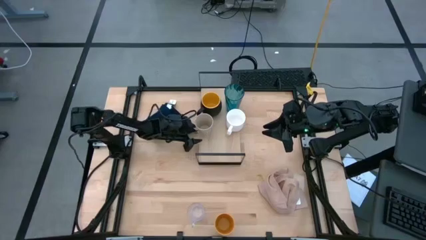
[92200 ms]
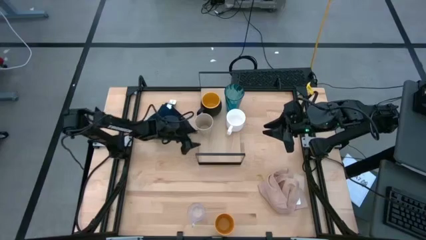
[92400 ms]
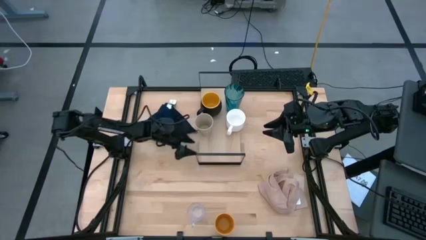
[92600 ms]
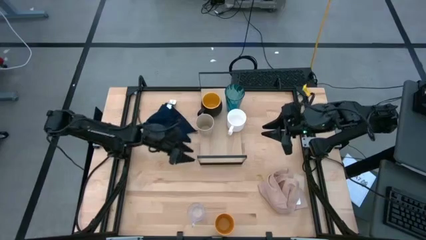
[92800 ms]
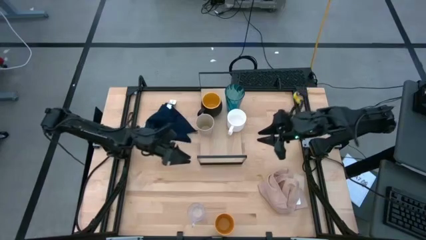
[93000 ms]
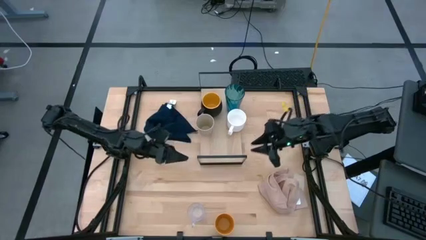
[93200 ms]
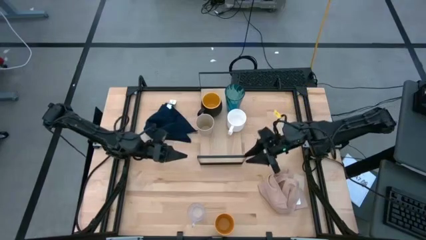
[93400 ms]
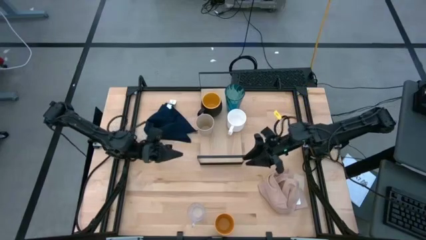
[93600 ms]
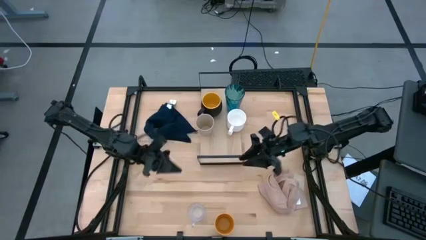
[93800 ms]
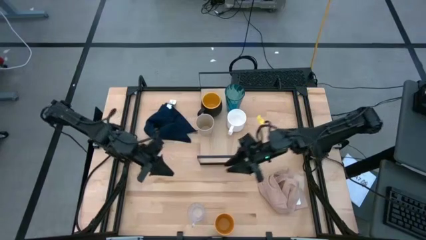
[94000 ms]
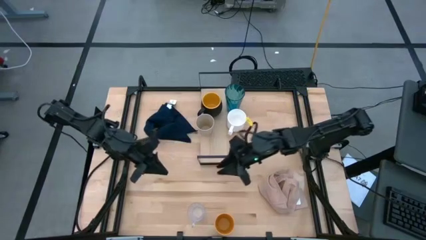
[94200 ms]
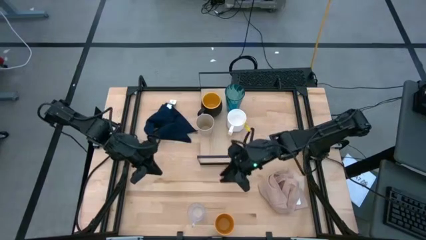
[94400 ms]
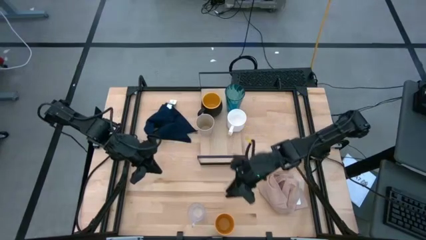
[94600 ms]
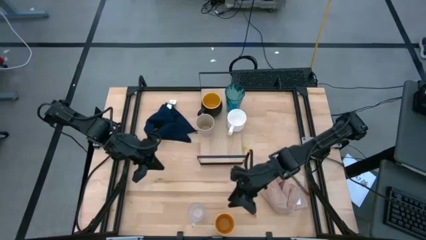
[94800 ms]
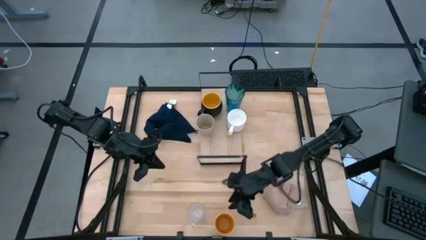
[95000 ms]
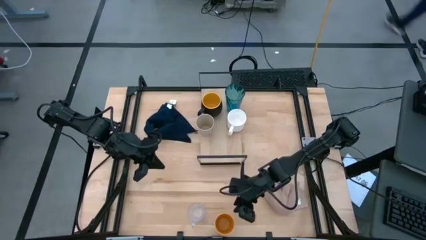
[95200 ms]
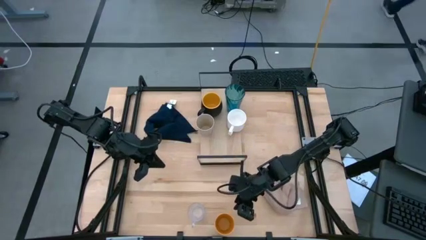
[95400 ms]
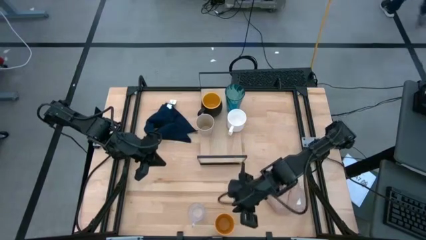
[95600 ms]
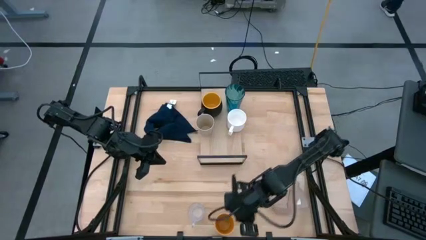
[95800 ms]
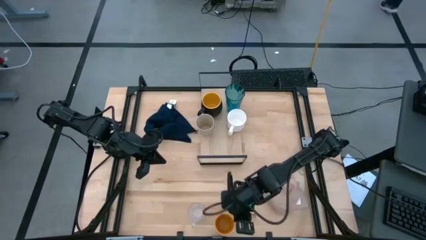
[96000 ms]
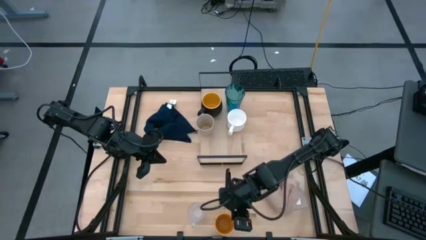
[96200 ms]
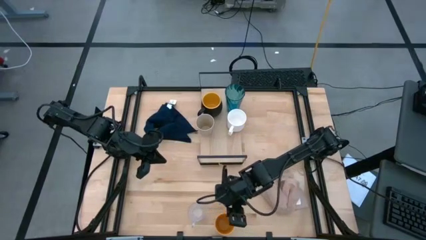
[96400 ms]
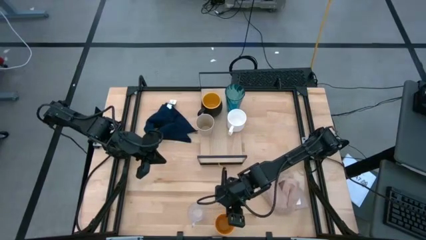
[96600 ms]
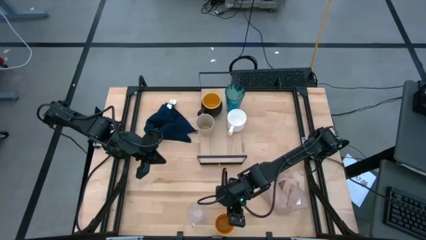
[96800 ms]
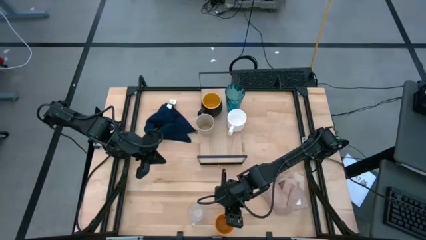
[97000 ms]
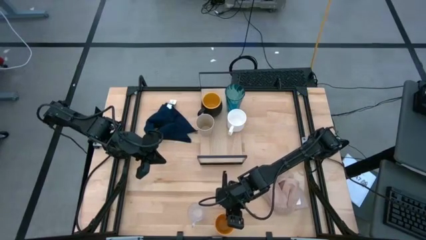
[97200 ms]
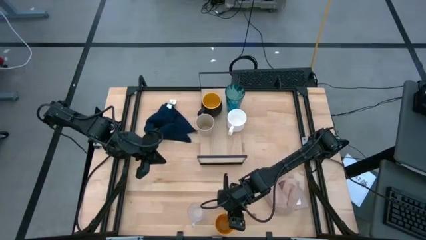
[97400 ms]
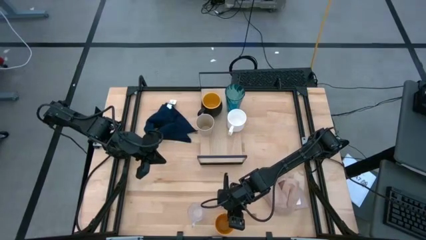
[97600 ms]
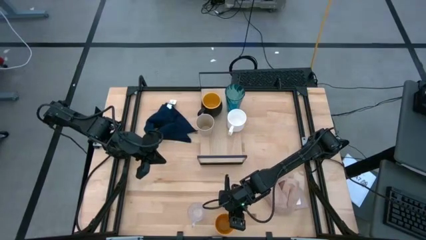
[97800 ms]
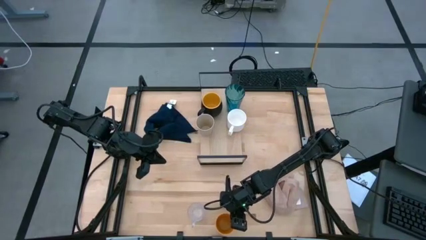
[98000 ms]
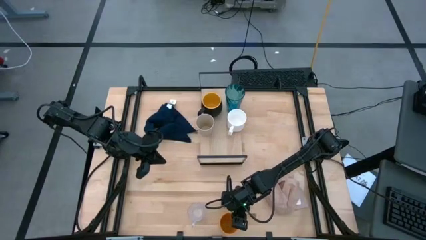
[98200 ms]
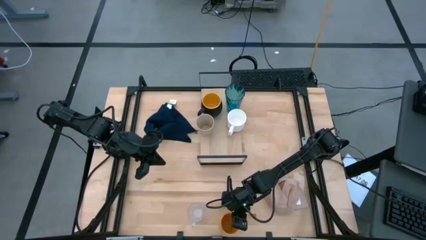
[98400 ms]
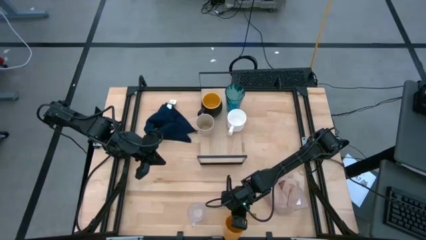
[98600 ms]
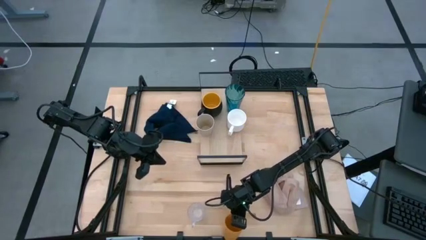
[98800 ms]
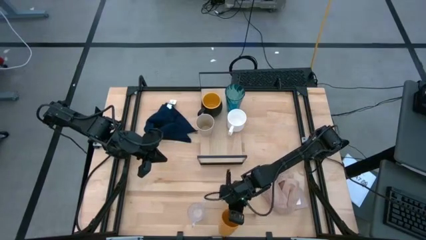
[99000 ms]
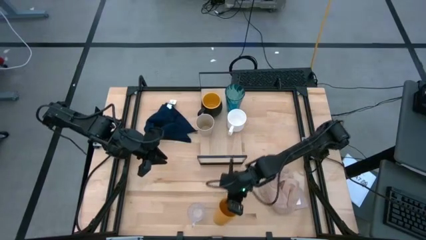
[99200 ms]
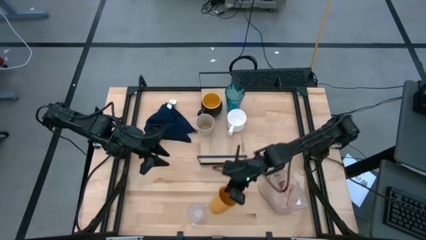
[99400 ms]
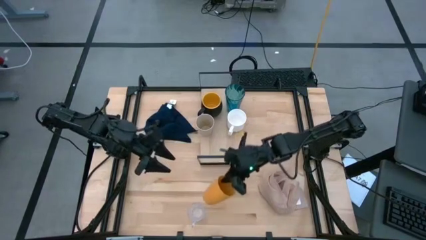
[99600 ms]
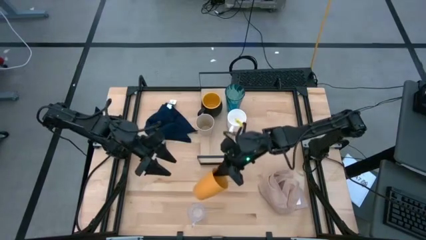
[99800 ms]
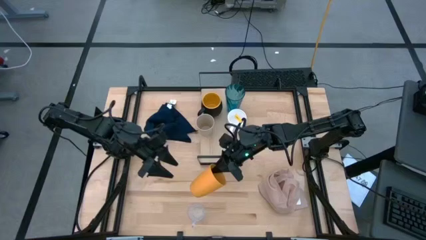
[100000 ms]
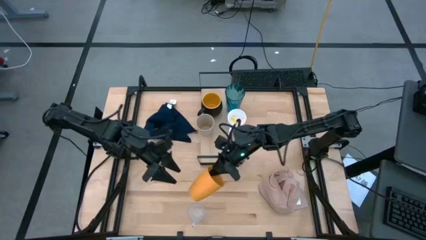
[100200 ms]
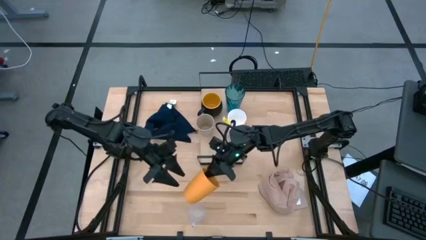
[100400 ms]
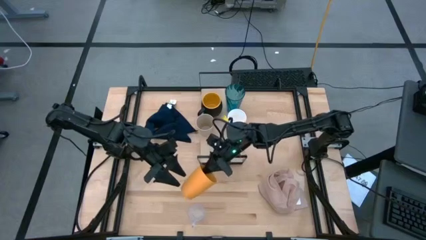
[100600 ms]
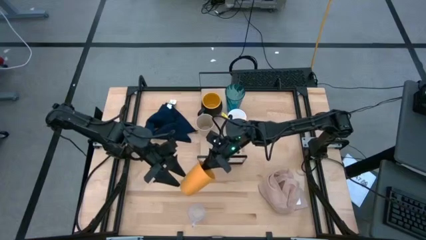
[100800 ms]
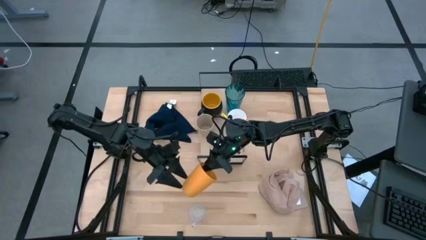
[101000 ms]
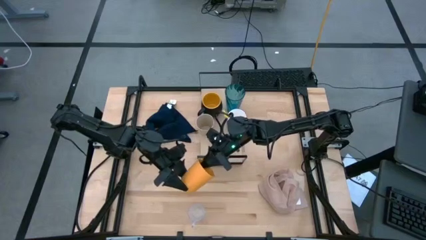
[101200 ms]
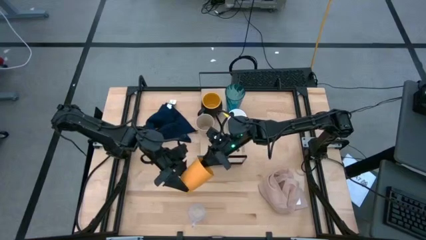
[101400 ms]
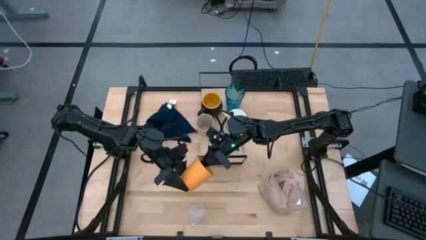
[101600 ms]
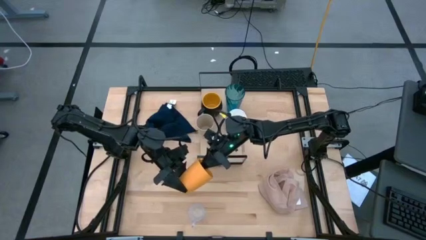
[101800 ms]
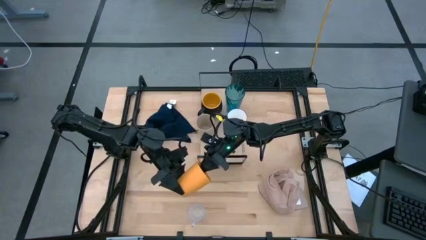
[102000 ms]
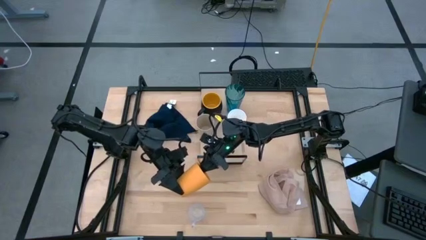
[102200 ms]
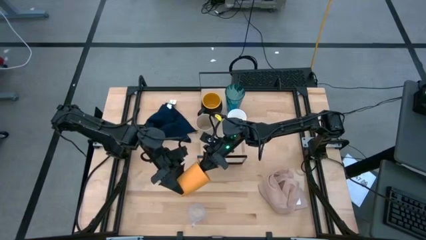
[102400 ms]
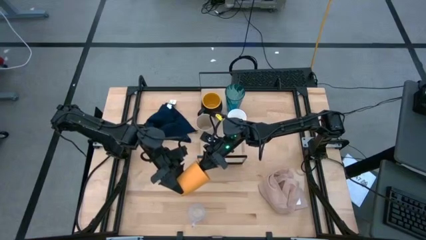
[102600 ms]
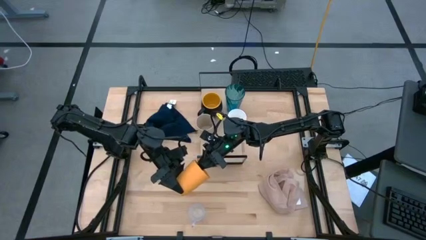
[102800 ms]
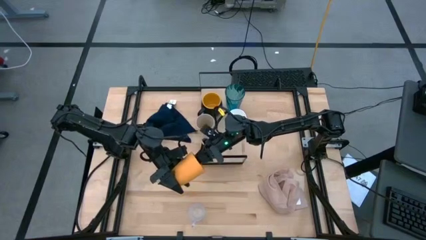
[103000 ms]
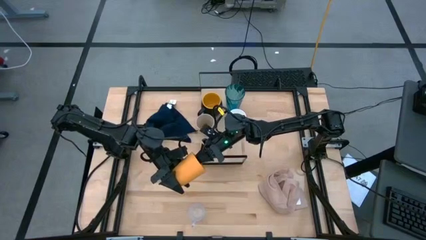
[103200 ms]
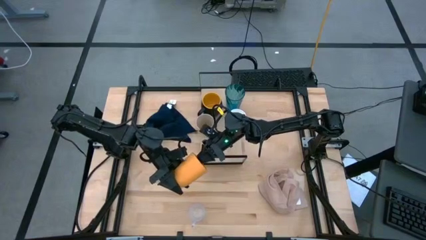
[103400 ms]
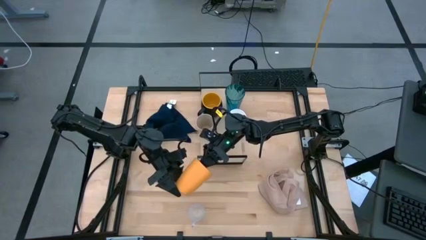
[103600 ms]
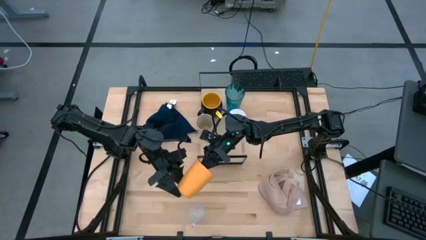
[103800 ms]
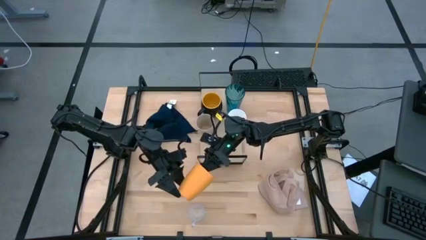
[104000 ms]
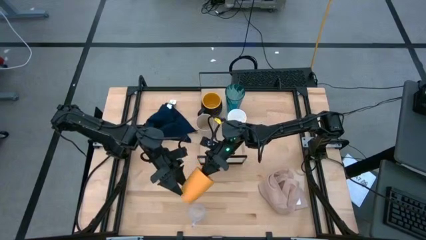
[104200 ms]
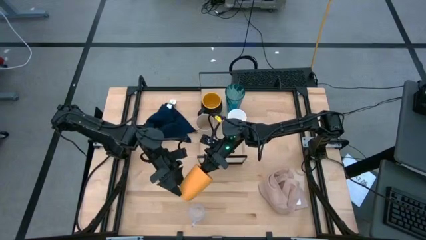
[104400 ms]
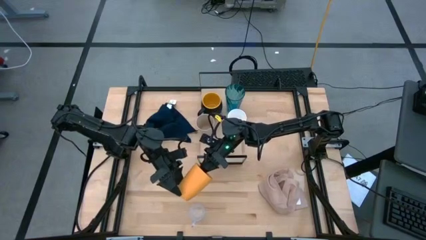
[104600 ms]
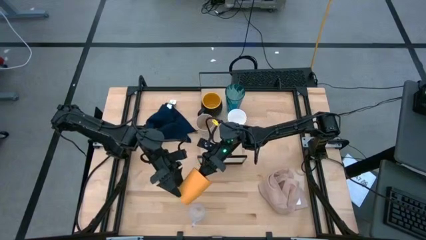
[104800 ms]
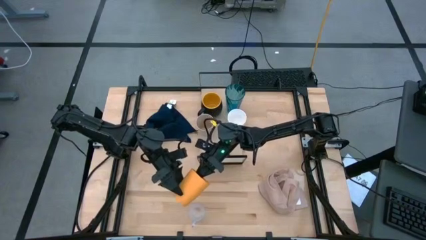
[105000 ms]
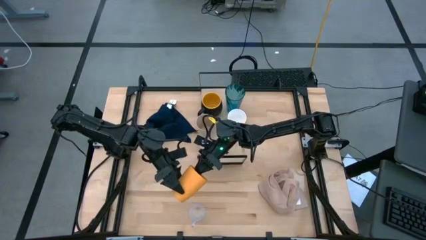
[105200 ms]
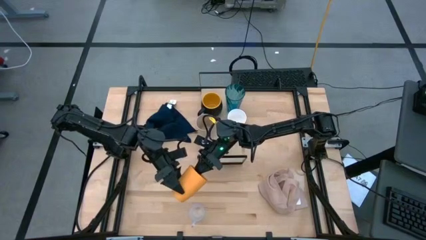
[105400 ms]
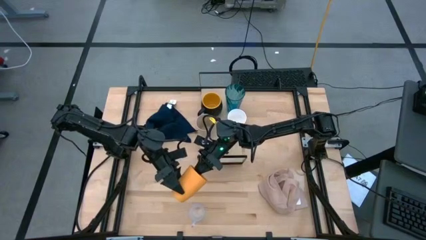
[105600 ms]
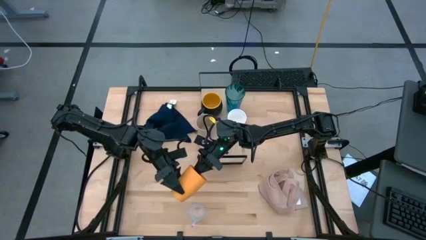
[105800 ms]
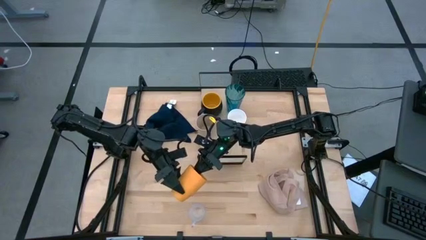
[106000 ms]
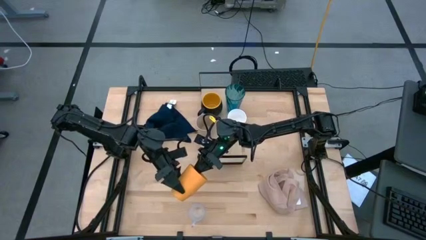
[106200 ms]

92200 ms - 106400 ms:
Task: Stack small to large cups/mugs on shelf
Put the yellow cup on the shelf

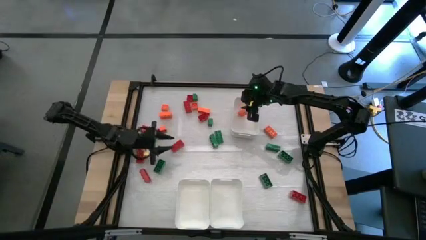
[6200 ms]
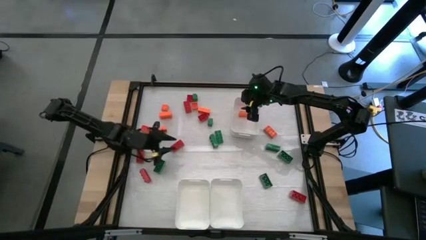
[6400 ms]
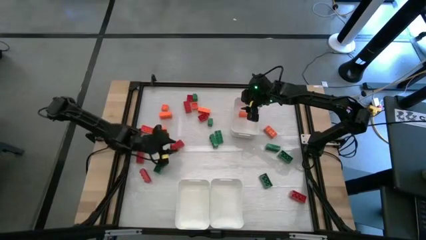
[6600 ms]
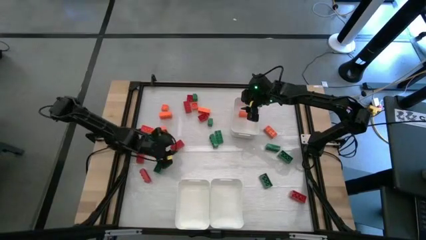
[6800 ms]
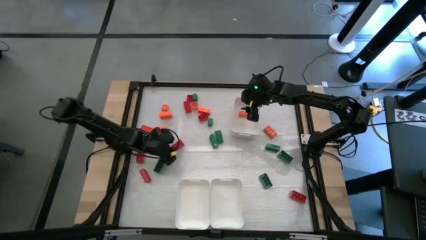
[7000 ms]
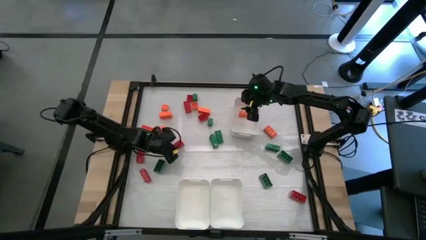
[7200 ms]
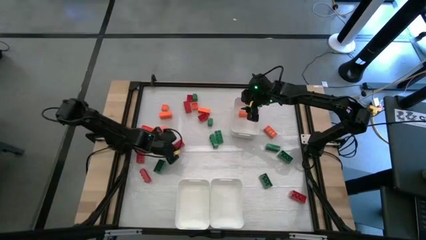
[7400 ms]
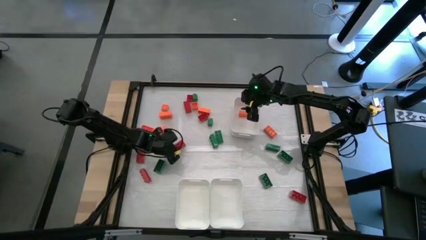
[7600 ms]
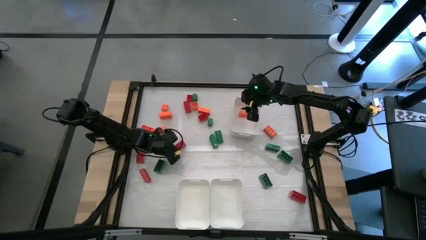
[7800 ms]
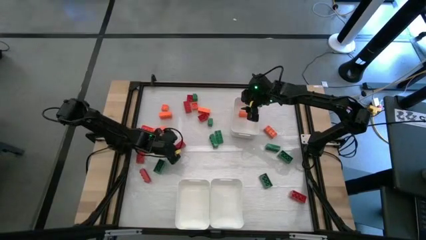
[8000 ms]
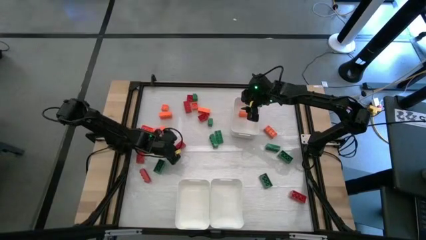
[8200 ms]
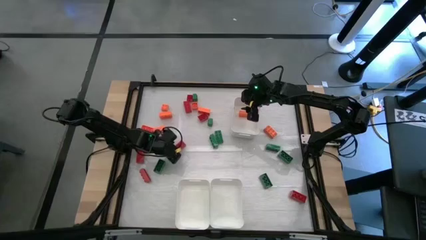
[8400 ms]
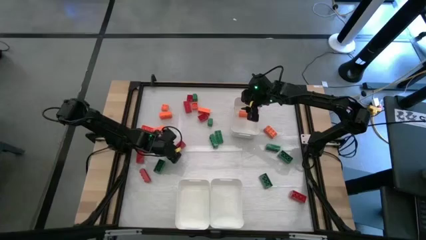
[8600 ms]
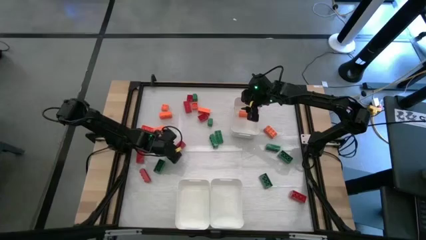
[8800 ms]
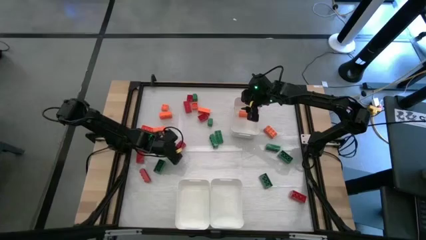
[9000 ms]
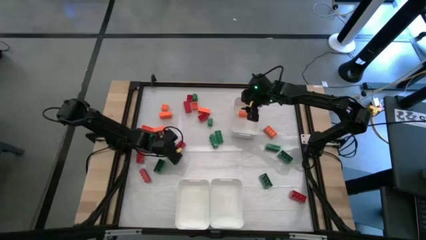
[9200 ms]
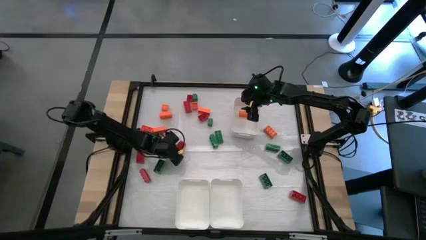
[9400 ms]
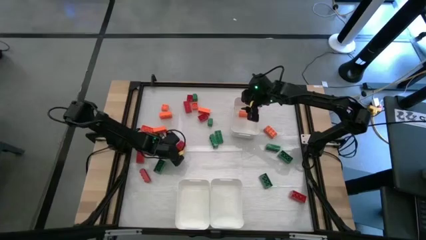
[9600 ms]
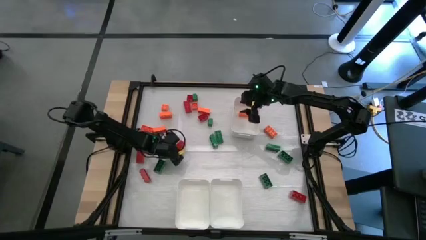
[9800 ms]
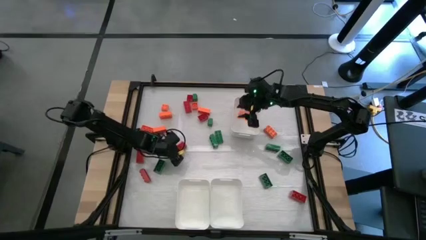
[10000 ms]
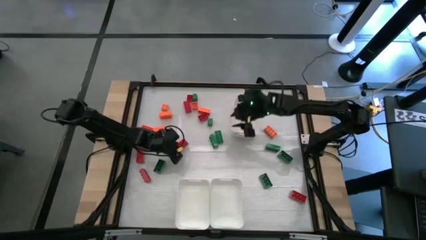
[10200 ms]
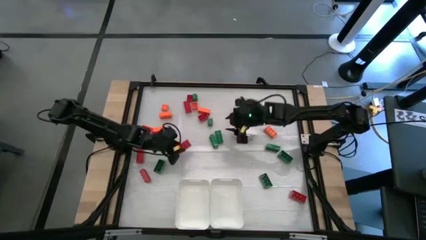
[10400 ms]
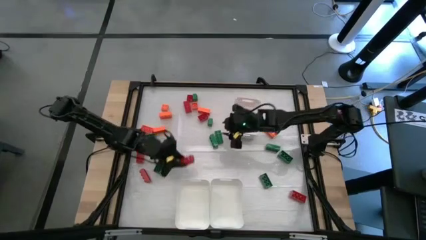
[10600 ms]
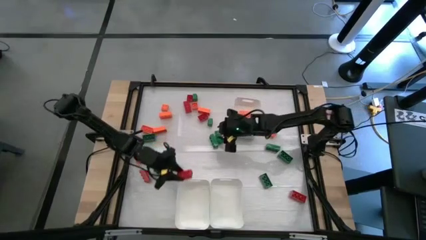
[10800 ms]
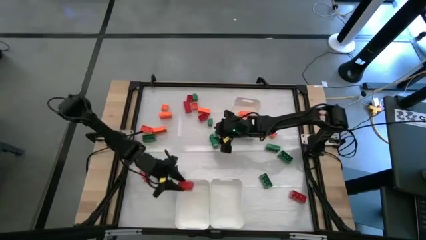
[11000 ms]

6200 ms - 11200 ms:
Task: Sort blocks
Put the red game piece into the bottom left white bin
